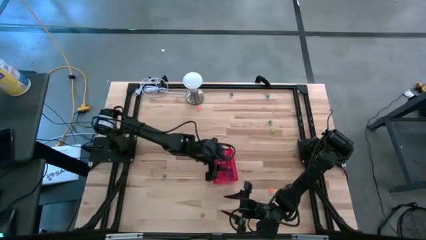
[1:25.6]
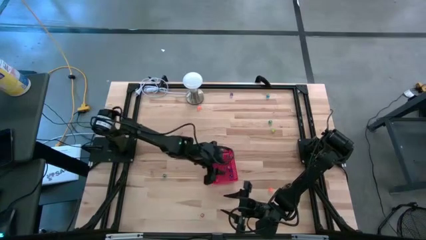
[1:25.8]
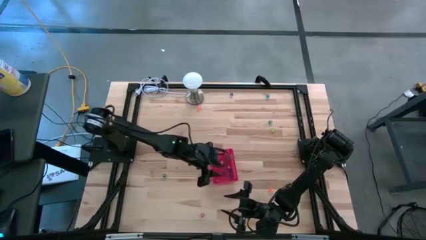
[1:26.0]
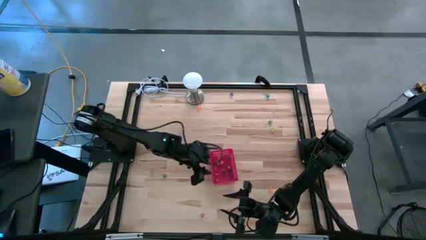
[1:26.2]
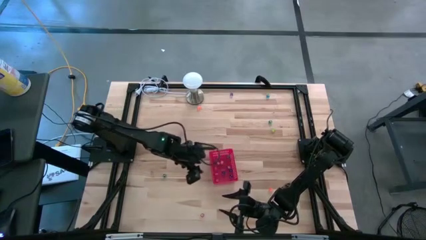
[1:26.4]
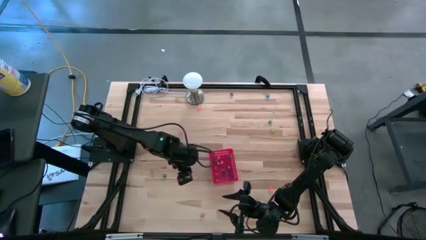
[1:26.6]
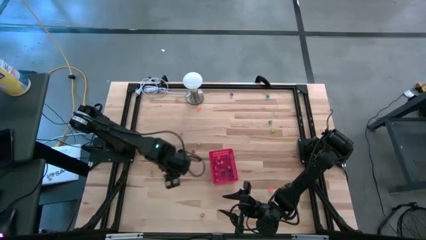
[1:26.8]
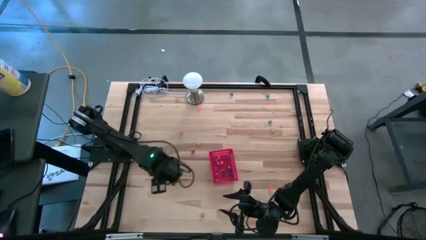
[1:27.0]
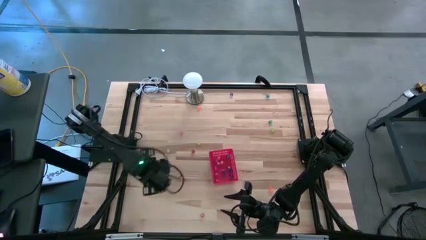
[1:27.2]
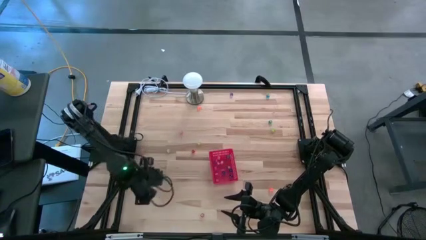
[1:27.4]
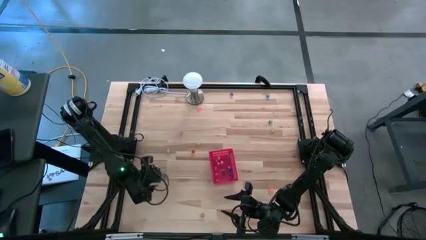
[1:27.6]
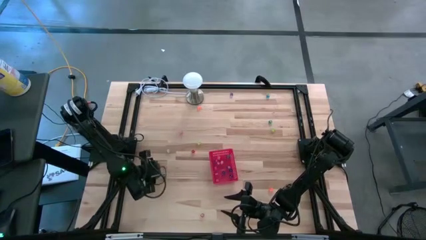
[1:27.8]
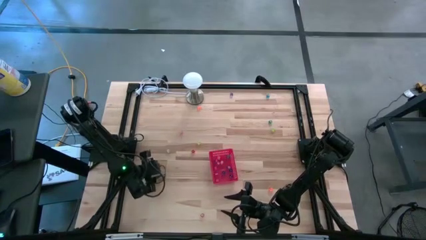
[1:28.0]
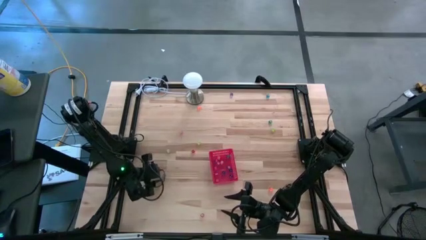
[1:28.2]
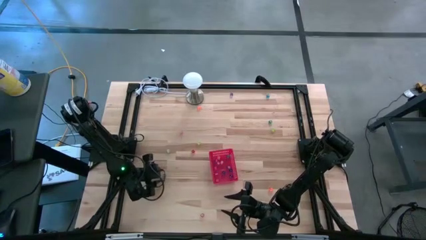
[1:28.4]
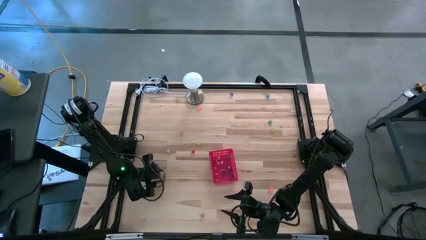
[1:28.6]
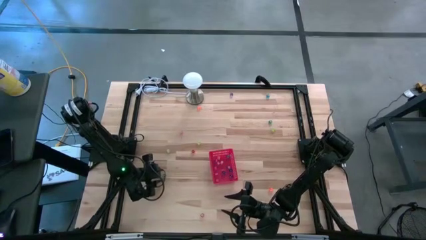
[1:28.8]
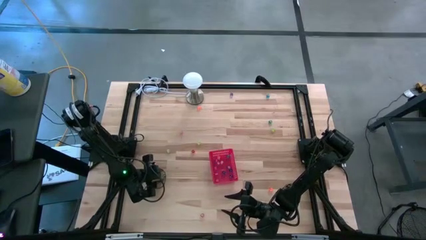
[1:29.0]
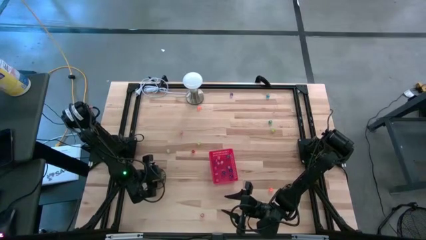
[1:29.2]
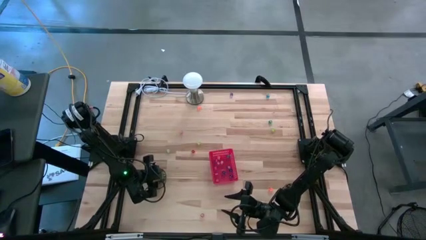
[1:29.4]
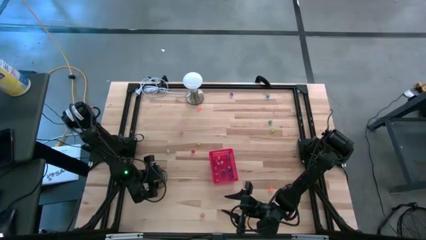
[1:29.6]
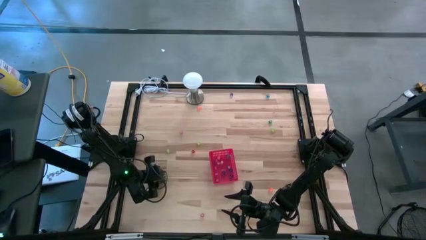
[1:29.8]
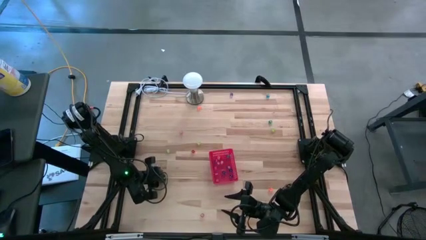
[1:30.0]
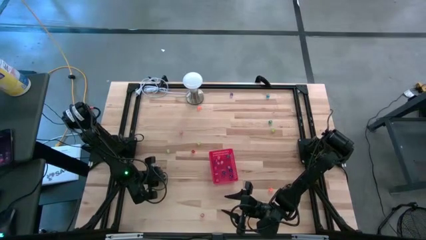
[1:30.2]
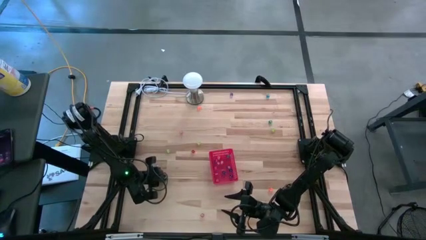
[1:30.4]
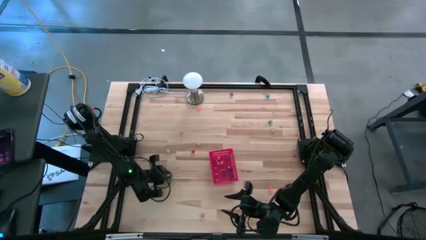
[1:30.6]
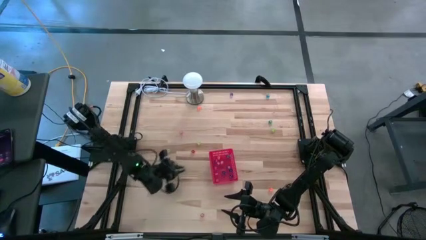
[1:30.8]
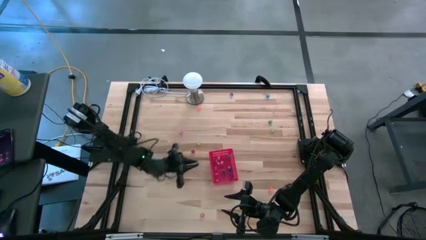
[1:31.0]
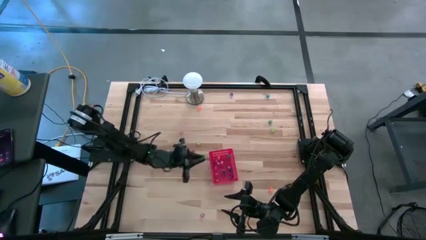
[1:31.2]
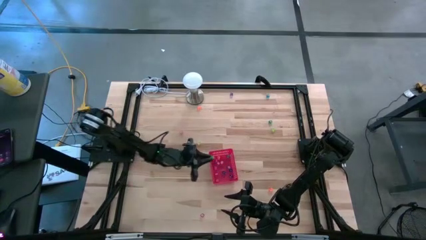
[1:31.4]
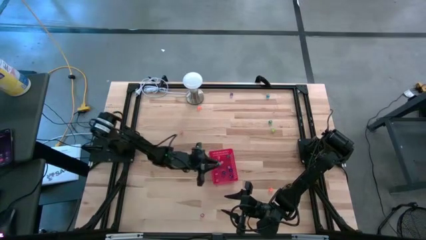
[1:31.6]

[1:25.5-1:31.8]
Task: Pick & Place Dice
Put the green die into the red basket

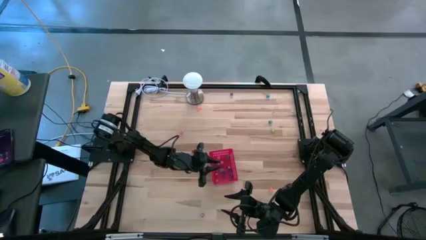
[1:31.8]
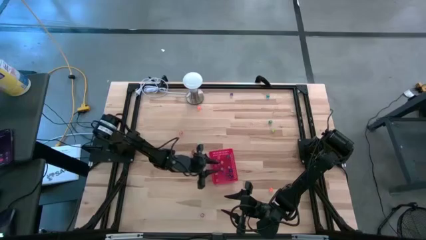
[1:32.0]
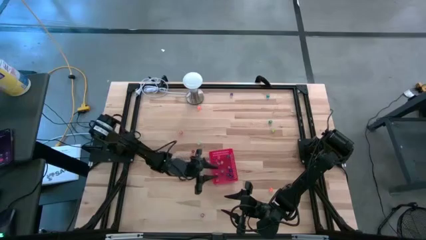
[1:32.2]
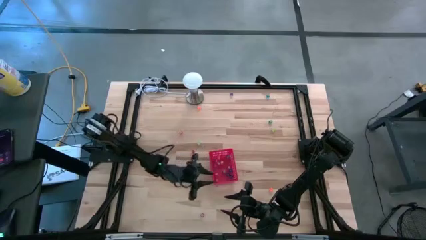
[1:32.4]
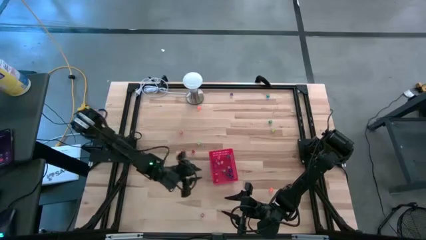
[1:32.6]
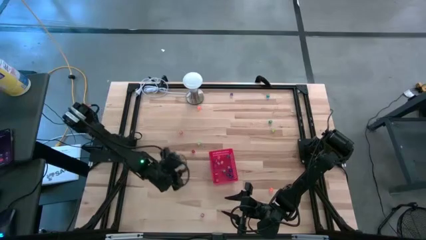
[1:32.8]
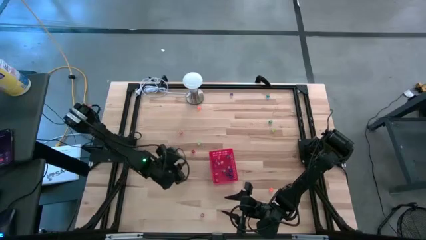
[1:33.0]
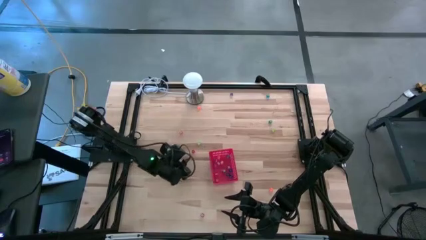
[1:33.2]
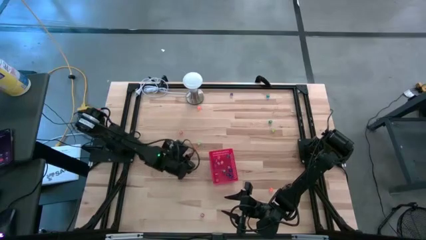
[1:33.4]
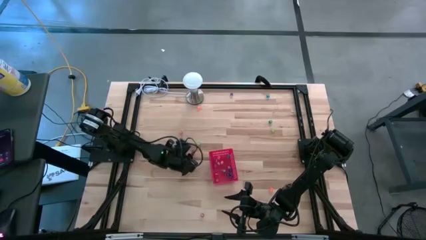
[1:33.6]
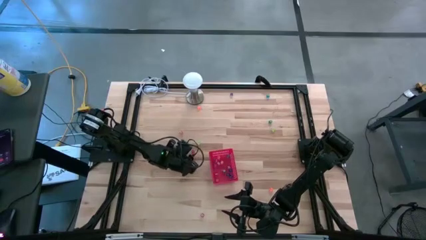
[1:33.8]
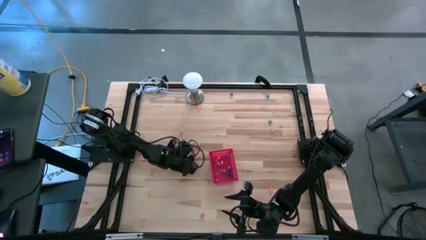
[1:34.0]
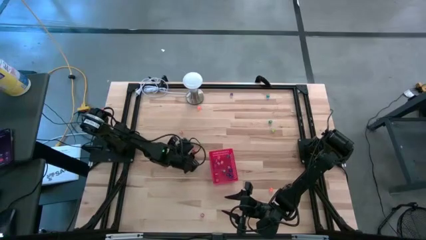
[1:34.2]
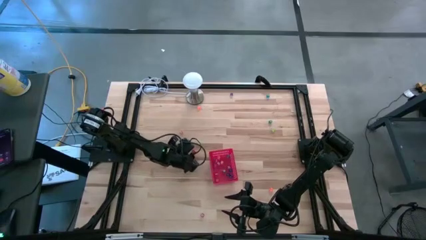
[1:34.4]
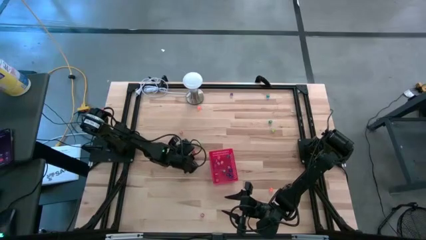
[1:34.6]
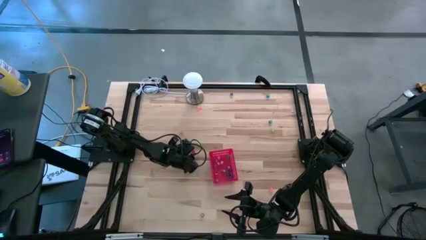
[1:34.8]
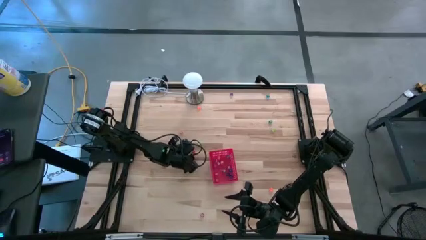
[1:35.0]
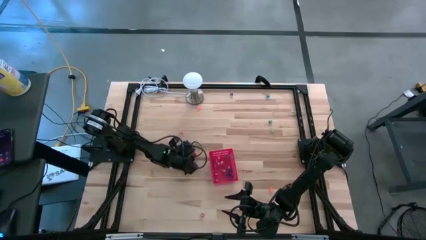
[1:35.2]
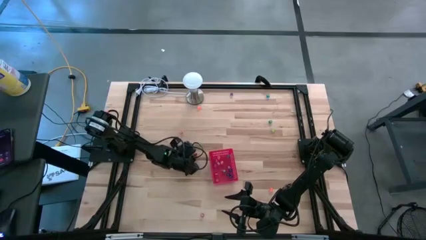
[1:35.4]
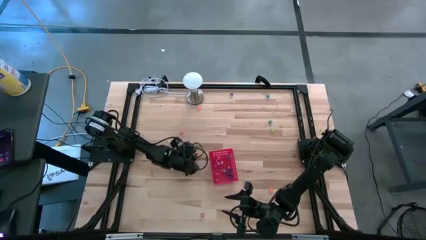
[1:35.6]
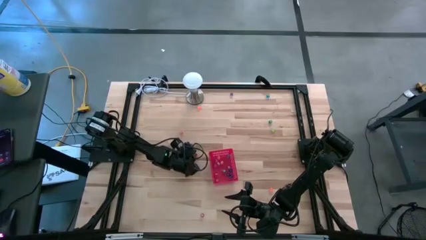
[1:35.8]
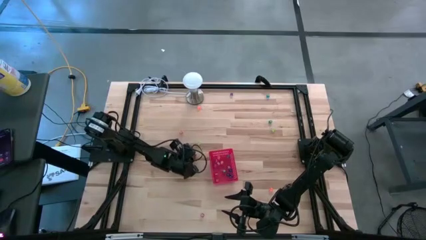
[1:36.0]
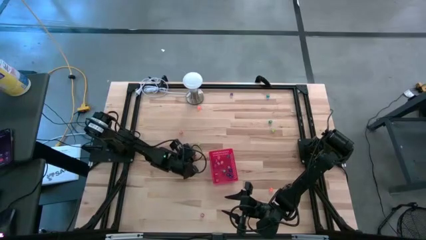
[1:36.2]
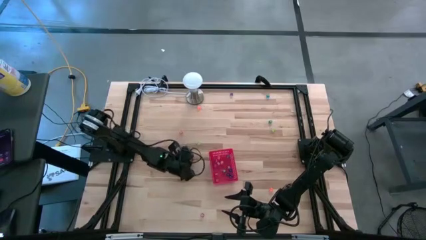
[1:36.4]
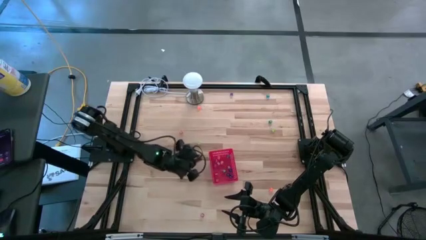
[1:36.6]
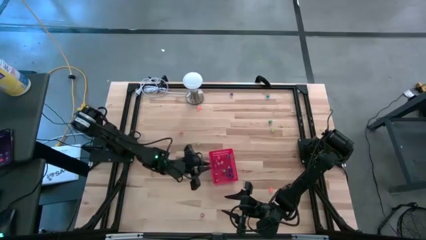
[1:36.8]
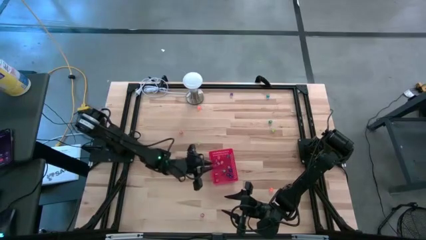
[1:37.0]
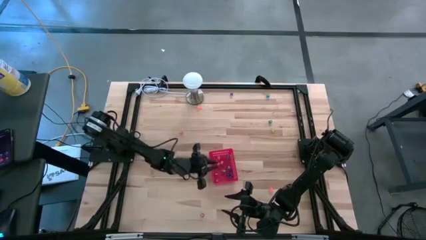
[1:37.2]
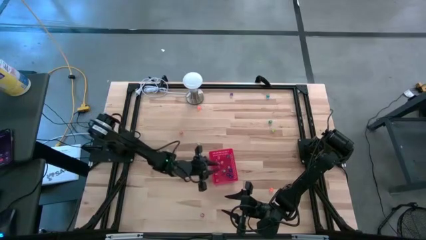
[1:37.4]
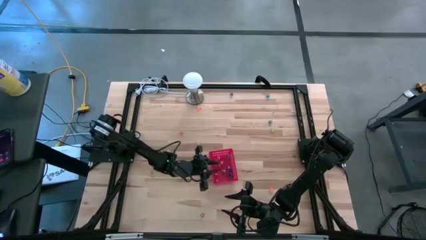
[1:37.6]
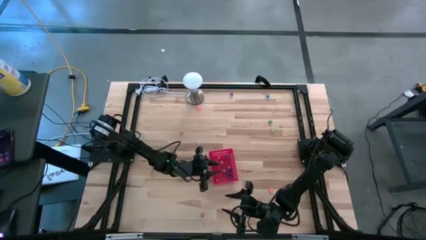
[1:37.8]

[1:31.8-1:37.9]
Put the red die into the red basket

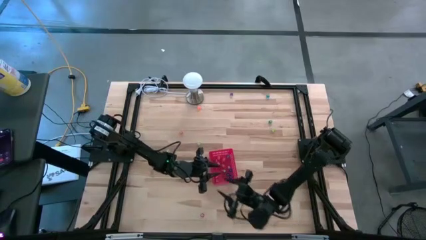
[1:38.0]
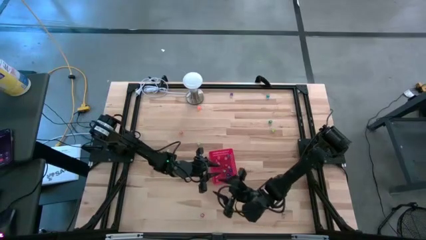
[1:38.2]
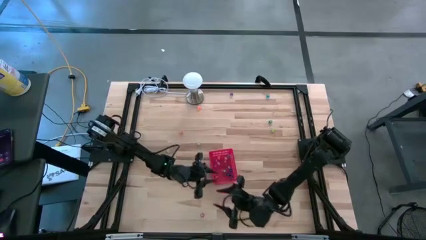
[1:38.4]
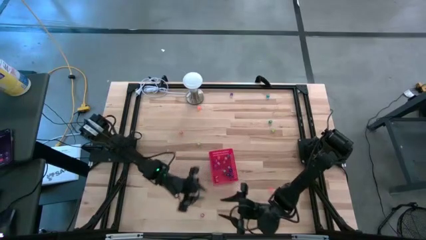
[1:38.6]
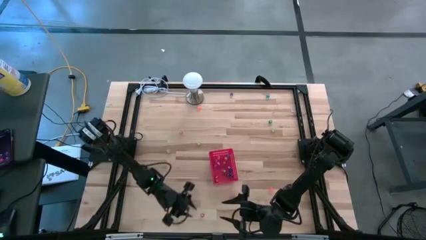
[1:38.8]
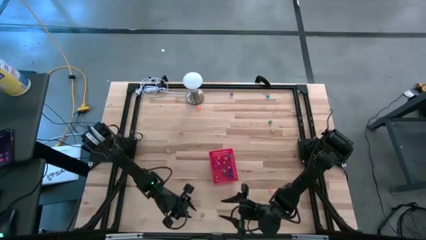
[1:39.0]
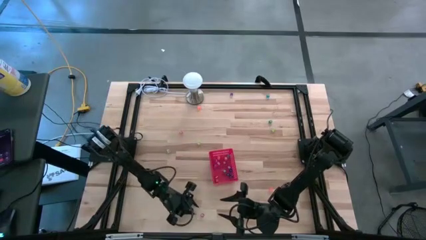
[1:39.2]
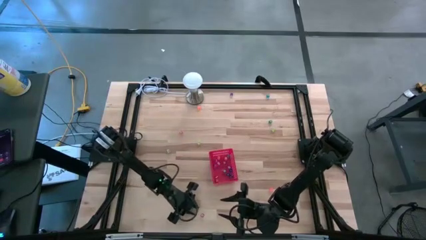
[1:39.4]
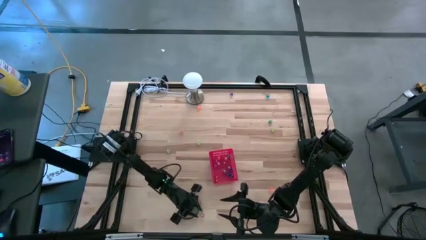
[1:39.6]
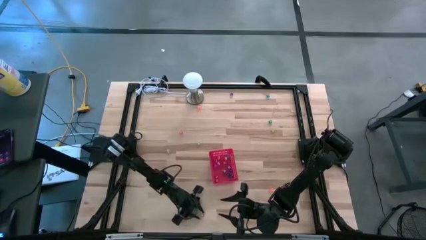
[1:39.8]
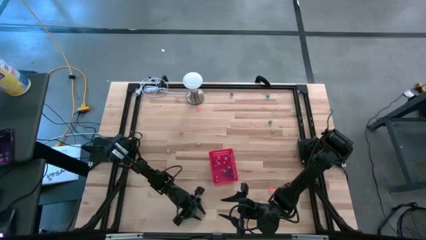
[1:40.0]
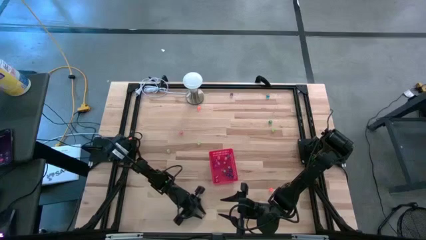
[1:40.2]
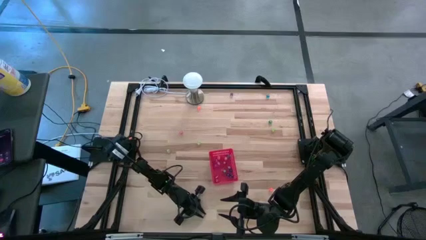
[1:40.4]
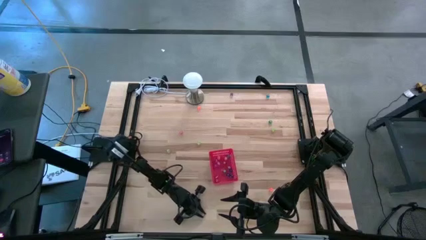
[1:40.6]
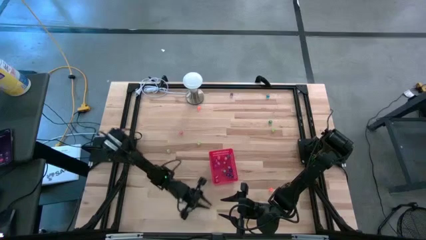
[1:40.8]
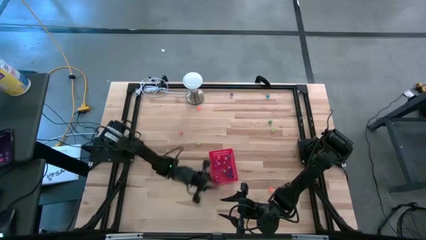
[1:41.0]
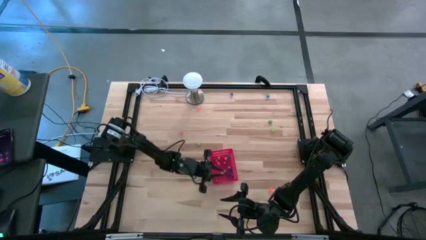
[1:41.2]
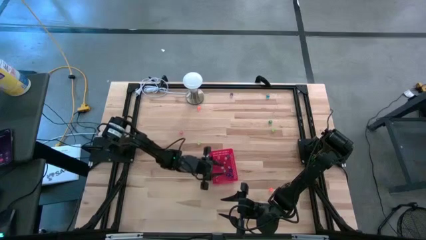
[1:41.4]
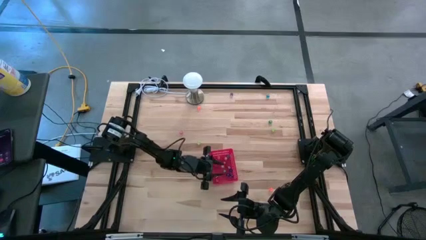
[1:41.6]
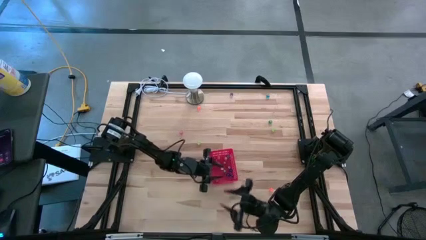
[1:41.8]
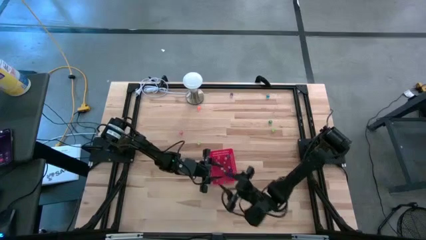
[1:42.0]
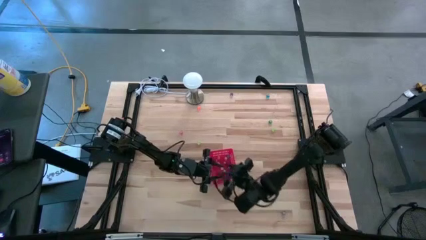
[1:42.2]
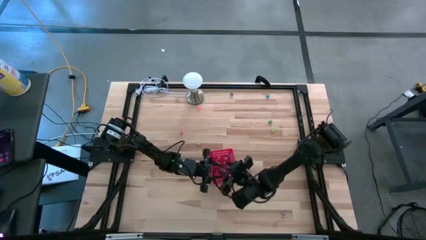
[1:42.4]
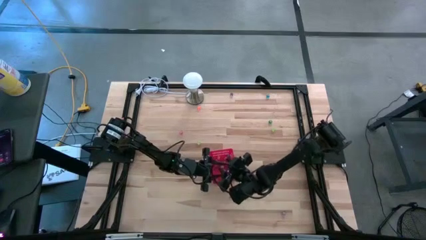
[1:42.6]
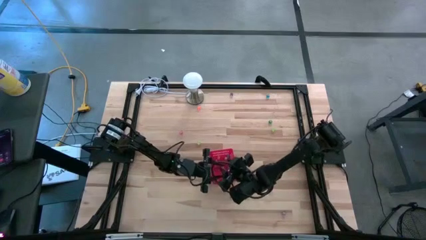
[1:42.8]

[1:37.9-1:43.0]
Put the red die into the red basket
